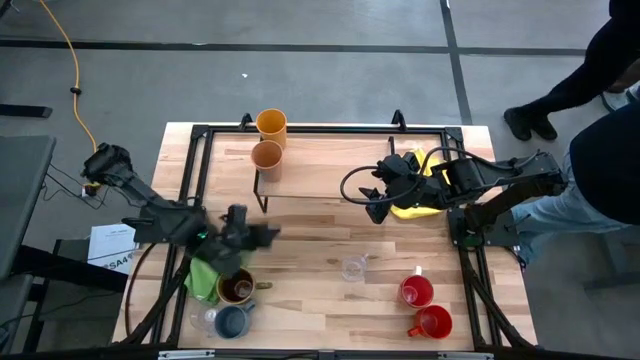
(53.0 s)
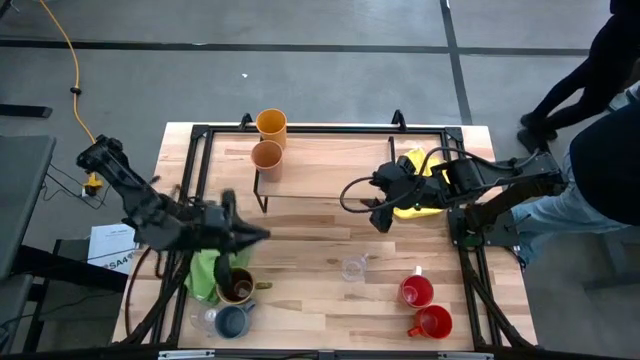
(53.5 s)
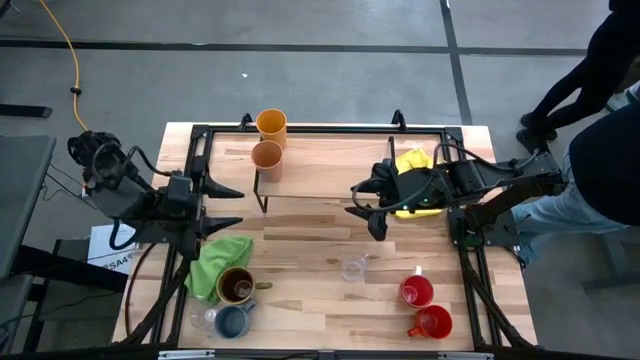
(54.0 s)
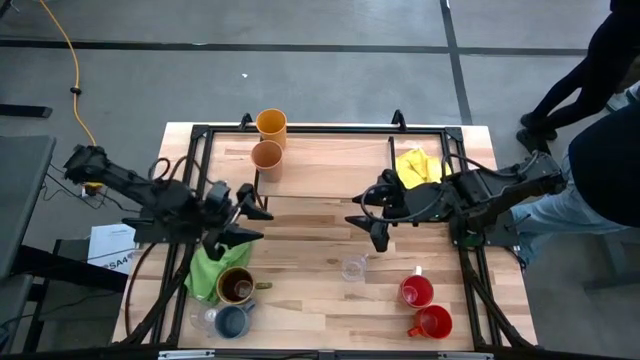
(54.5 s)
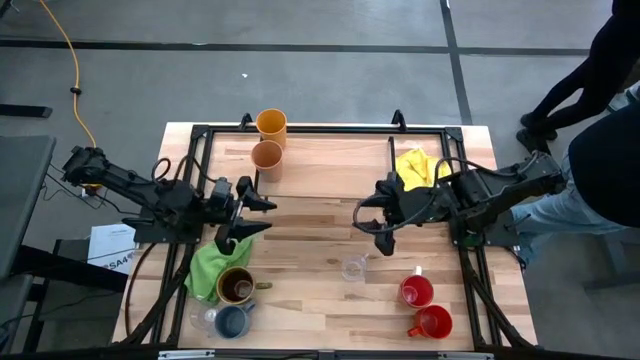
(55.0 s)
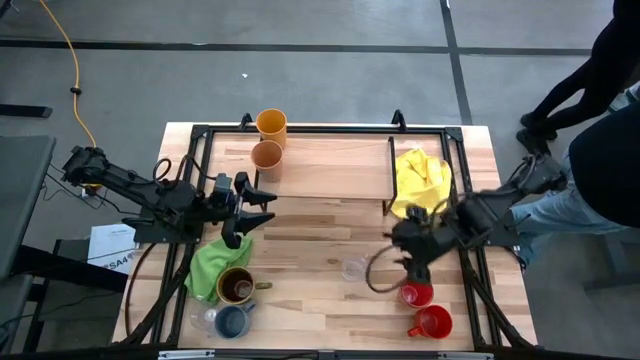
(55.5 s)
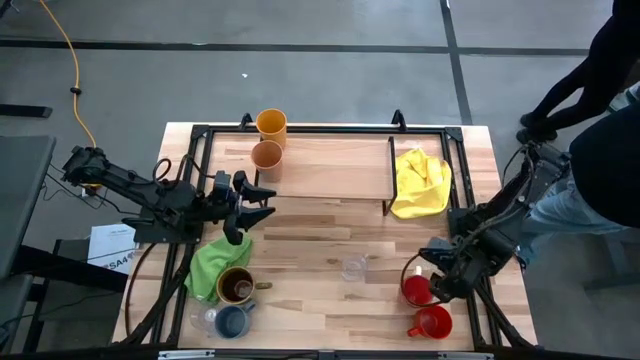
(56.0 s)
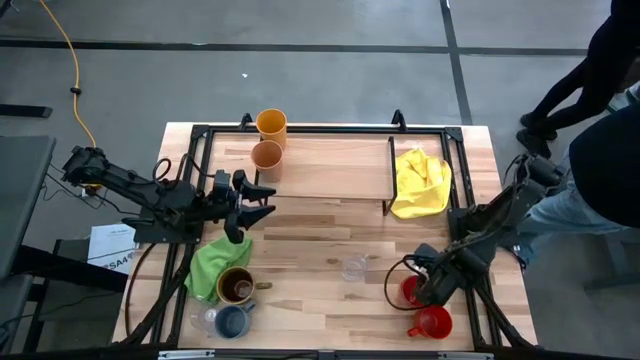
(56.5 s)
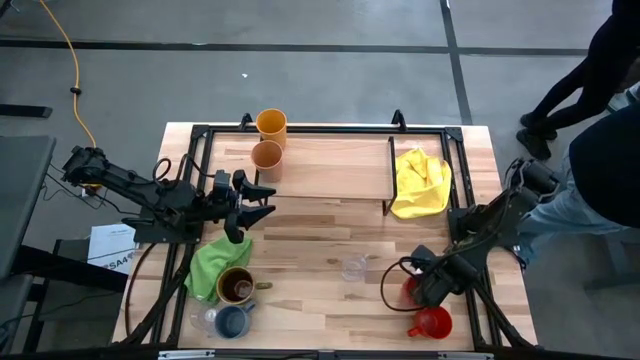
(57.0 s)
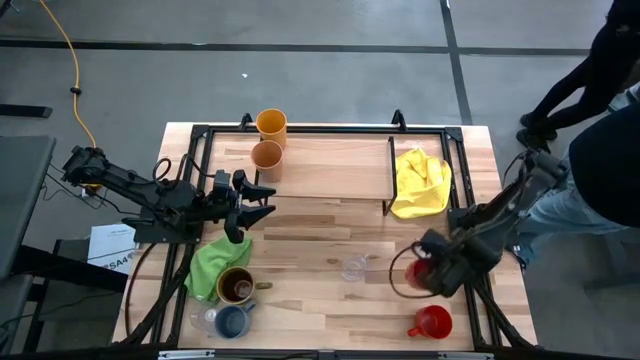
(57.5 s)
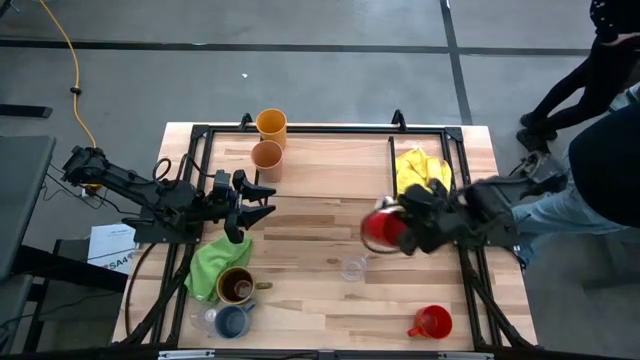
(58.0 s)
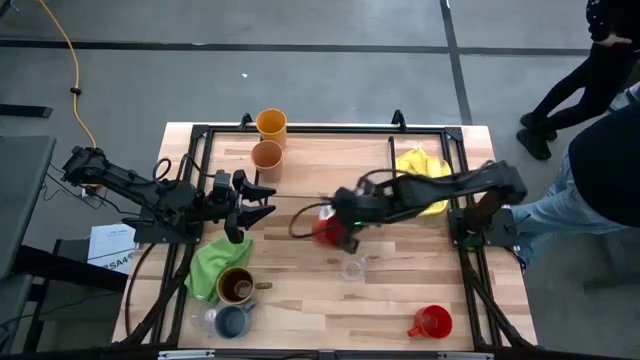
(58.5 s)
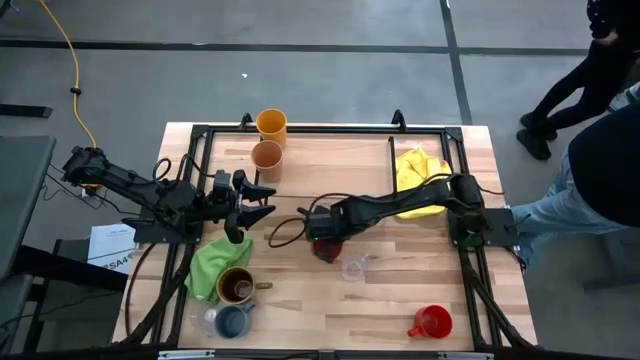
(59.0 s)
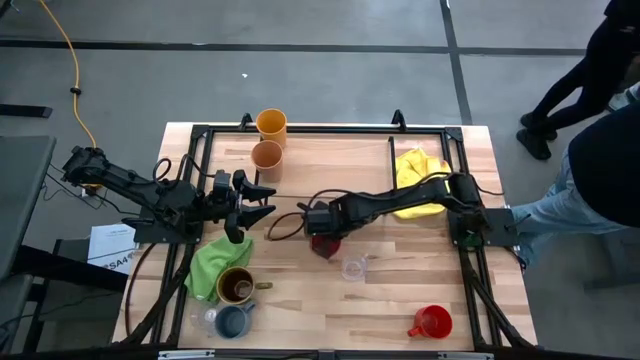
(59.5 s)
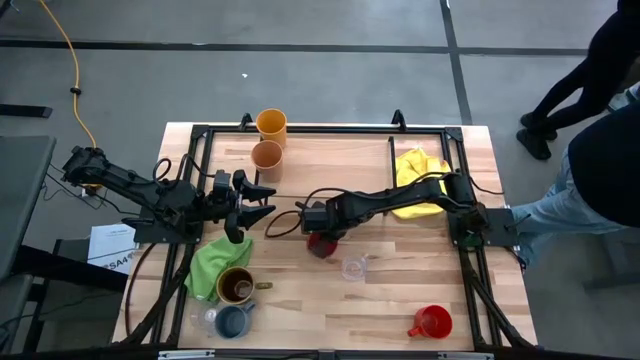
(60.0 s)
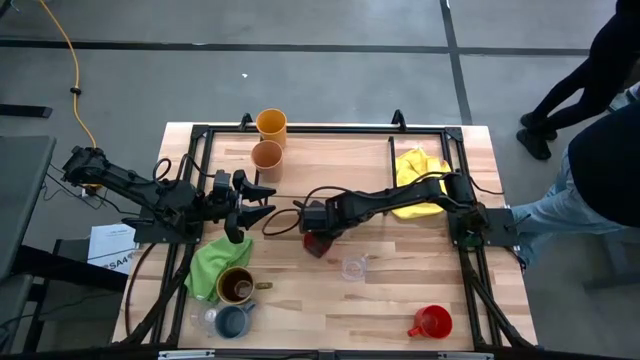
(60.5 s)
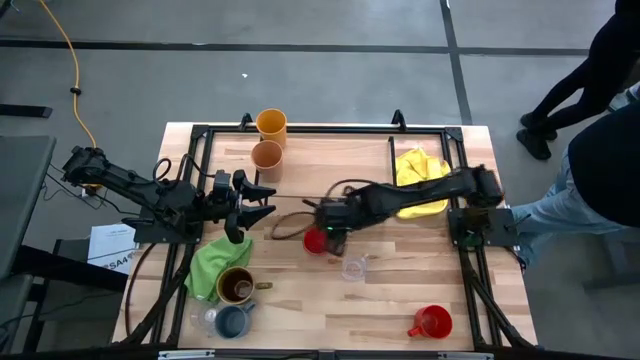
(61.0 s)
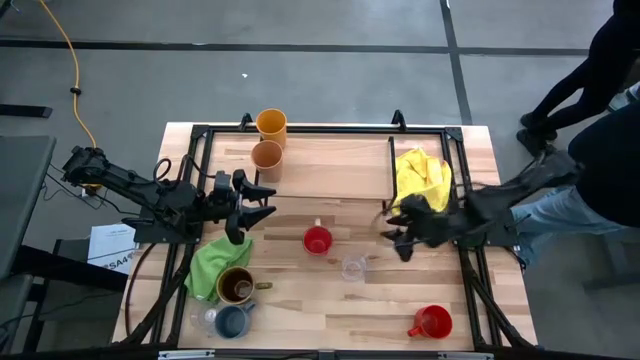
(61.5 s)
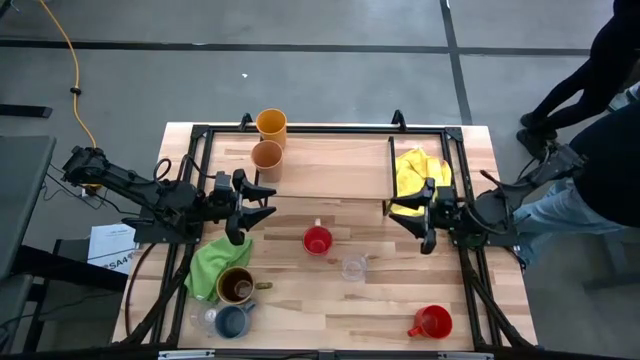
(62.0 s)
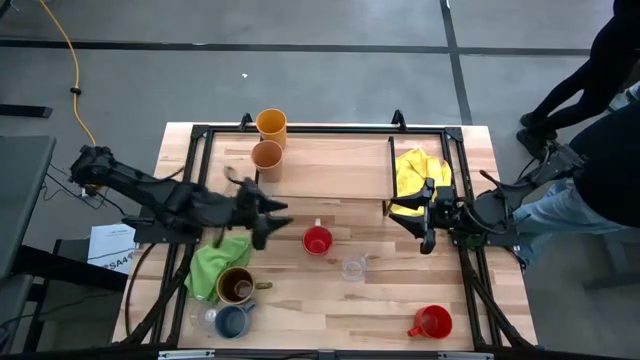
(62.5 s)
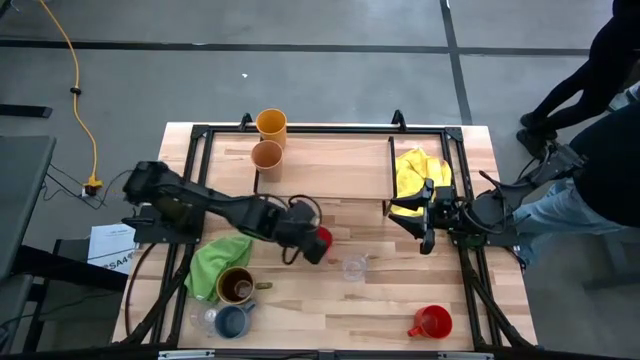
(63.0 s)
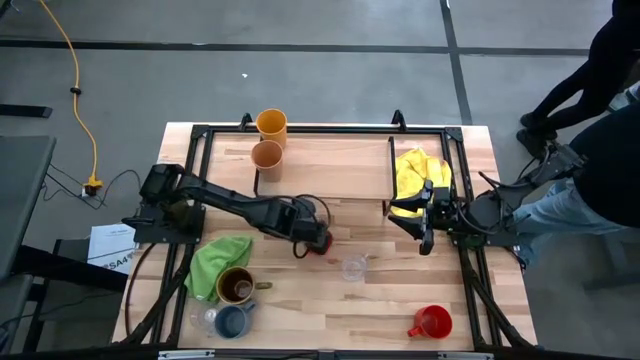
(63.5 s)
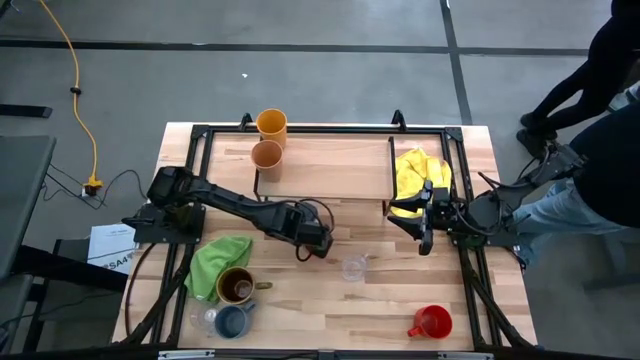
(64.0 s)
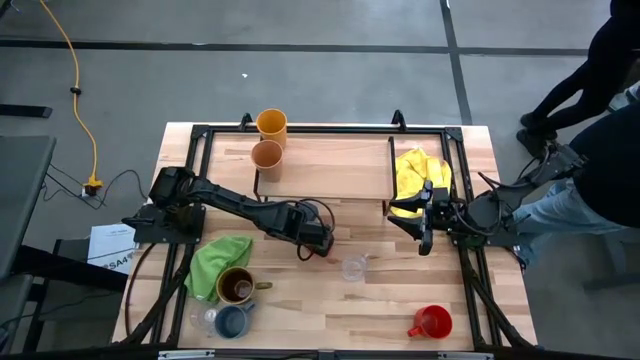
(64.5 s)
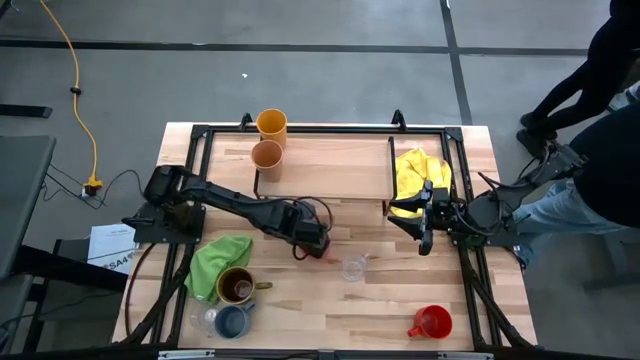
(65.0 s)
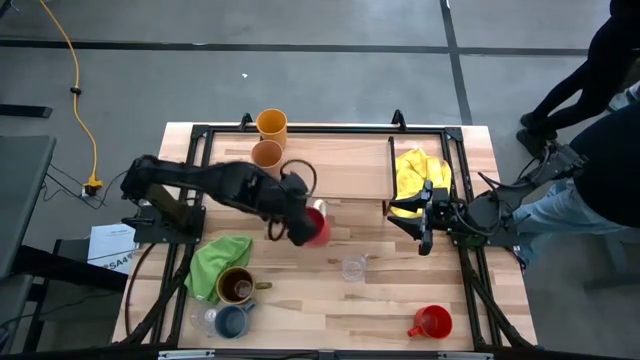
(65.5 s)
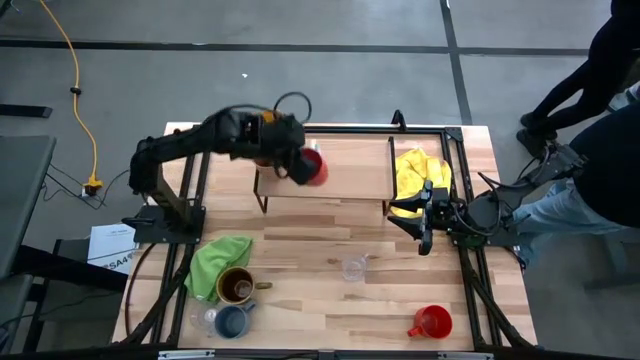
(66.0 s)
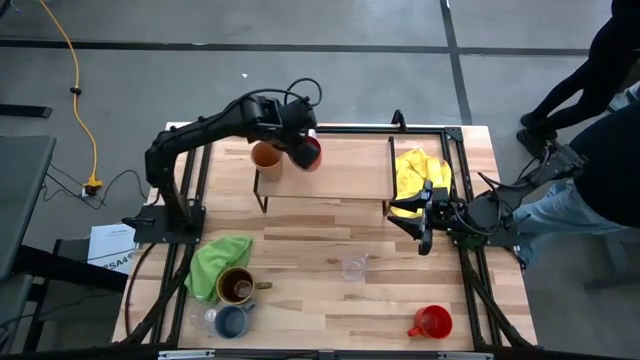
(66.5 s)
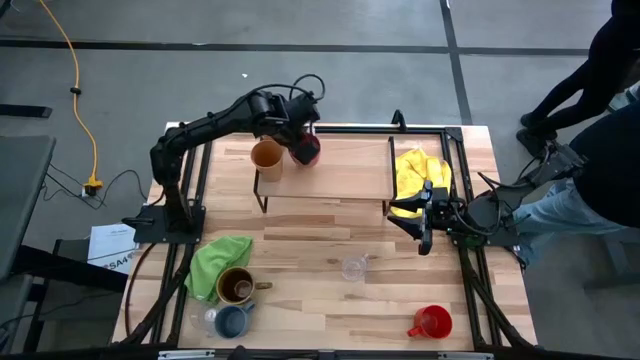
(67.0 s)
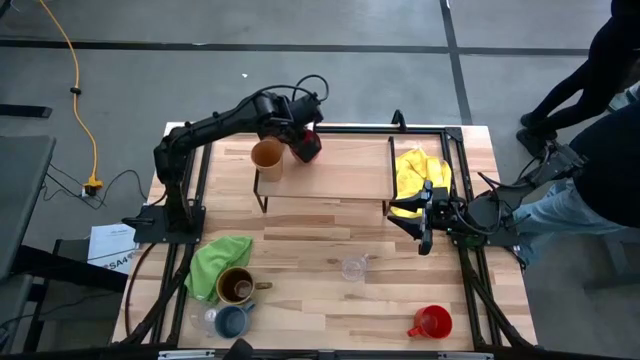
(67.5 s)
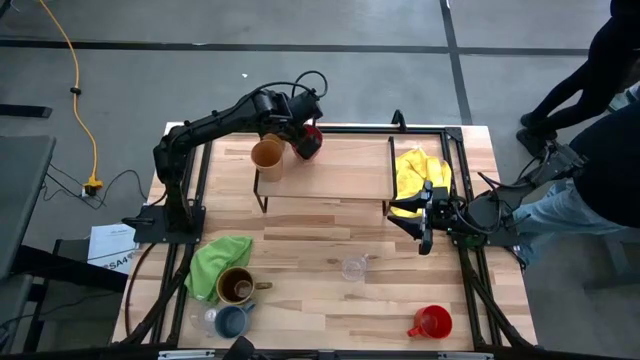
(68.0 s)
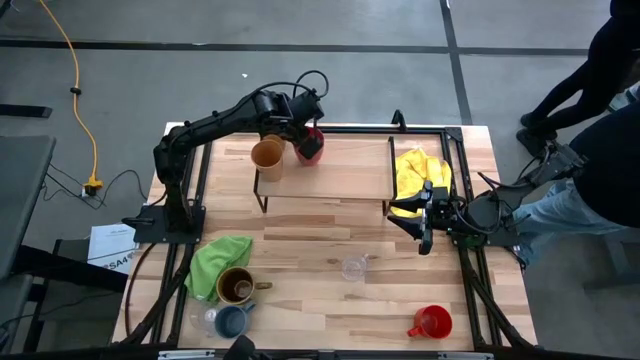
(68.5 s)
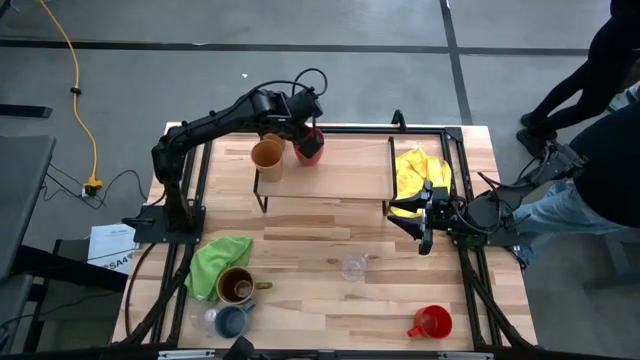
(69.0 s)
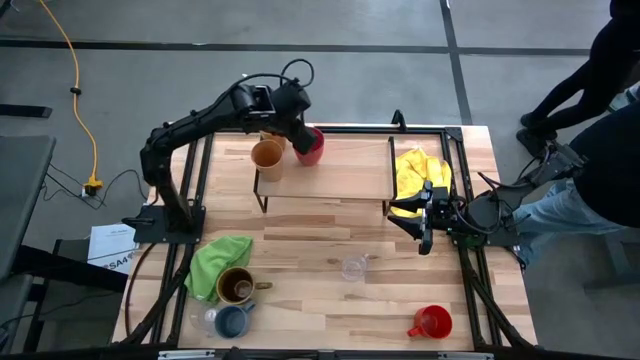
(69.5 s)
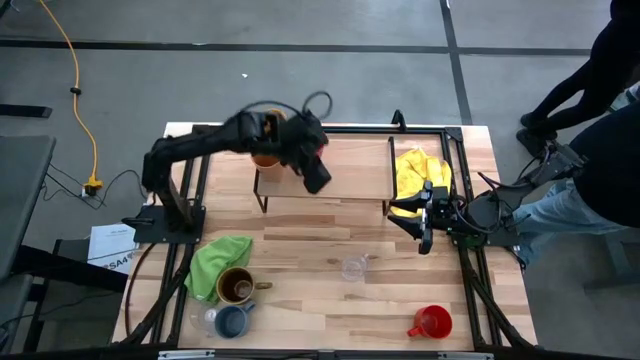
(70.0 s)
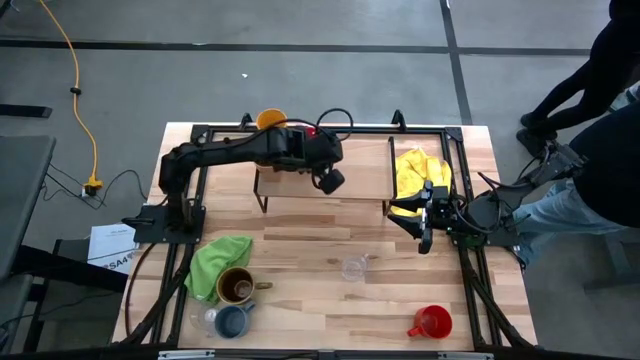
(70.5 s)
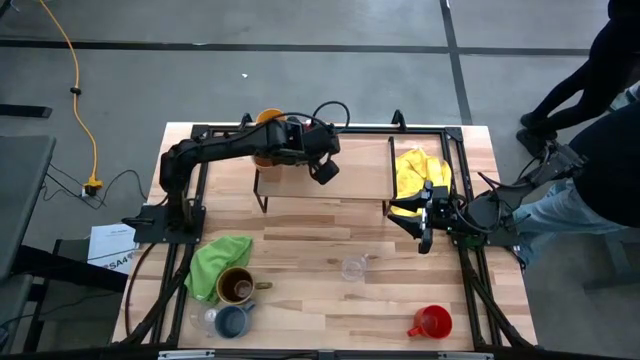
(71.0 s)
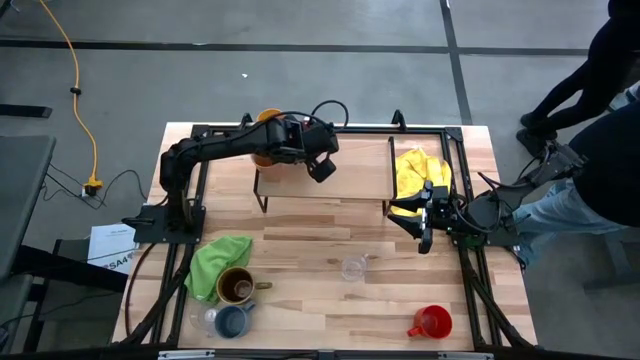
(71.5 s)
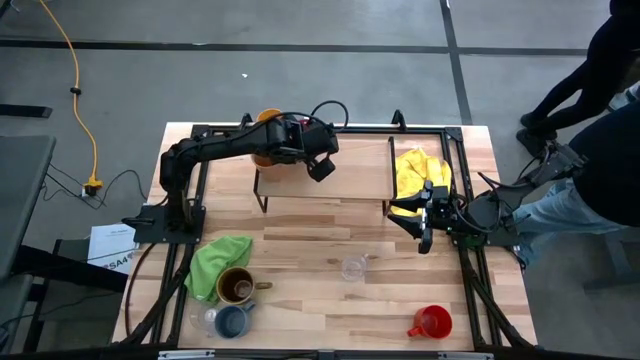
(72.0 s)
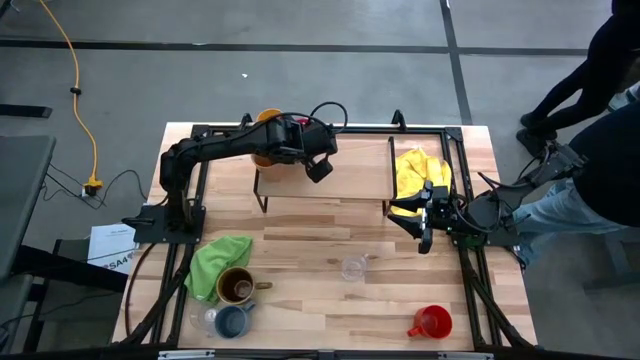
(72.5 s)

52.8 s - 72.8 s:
Task: Stack small to large cups/mugs on shelf
Put the red and white mug on the shelf

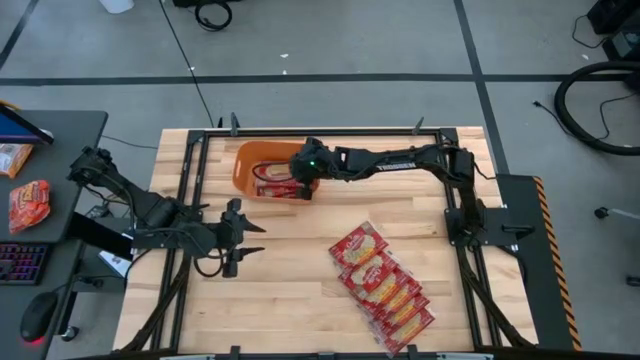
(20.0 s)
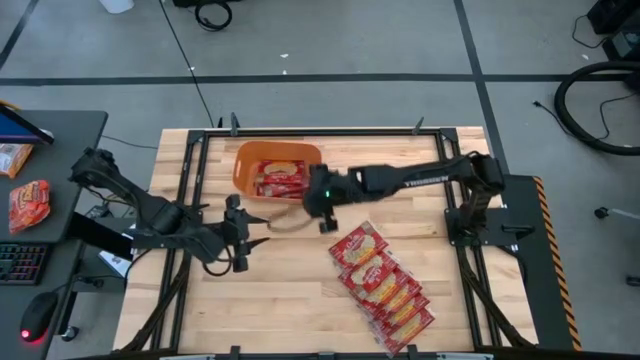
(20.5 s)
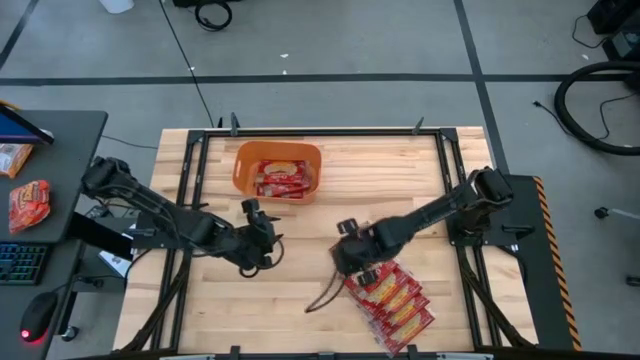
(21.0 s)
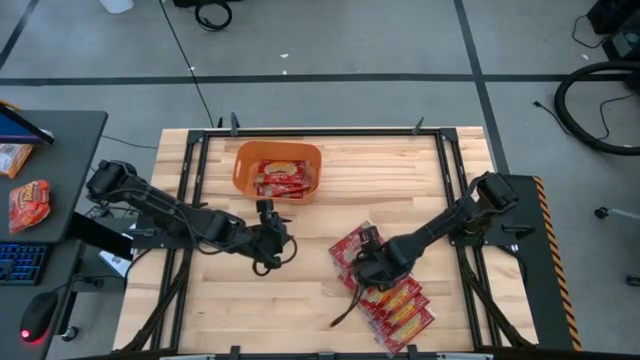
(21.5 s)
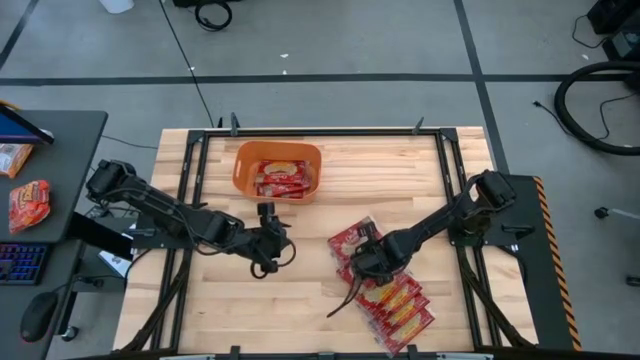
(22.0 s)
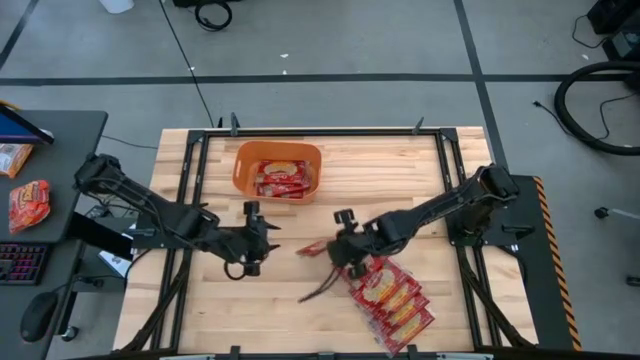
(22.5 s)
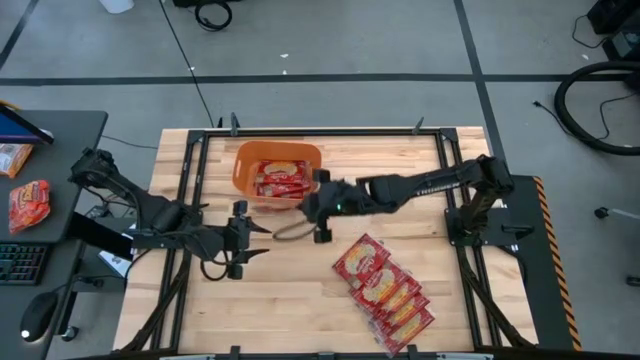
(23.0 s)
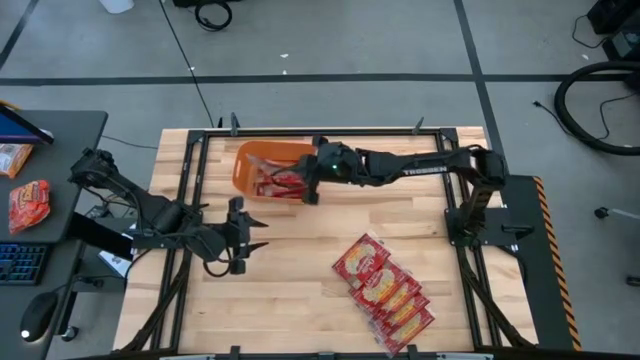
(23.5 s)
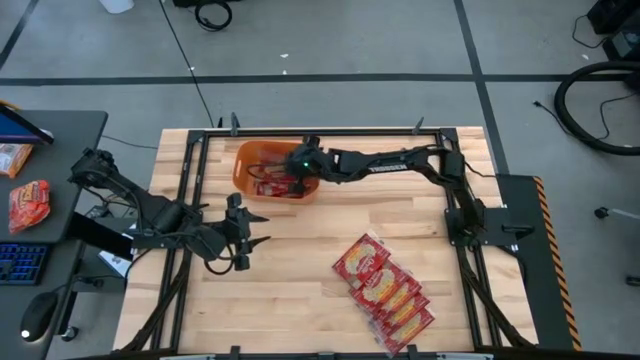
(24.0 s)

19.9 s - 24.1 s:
Task: Sort popcorn bags into baskets
Put the popcorn bag into the orange bin
